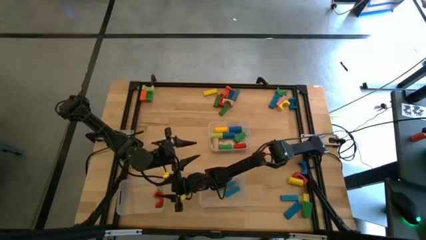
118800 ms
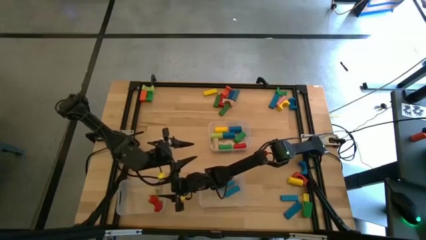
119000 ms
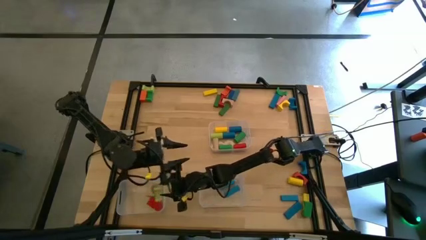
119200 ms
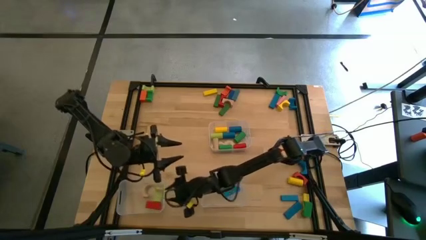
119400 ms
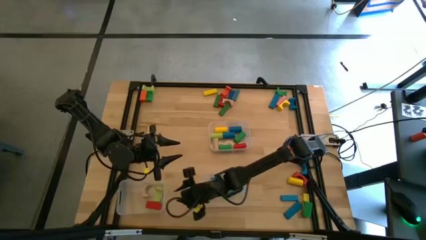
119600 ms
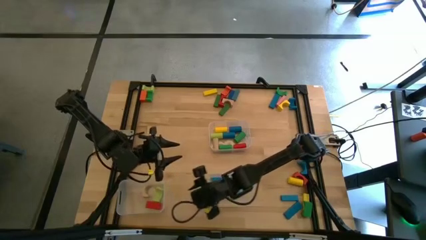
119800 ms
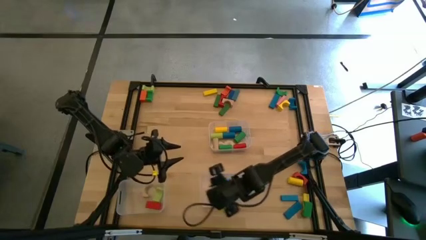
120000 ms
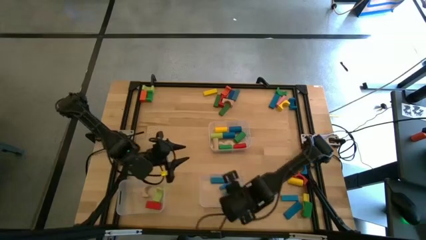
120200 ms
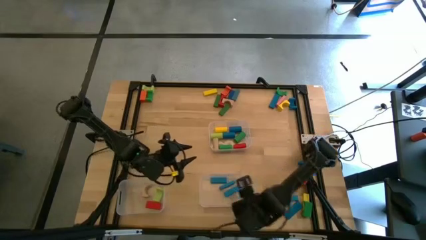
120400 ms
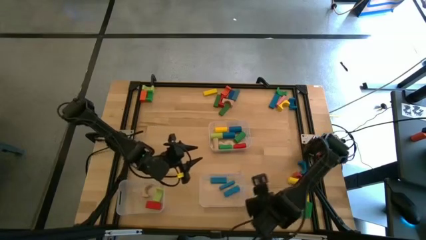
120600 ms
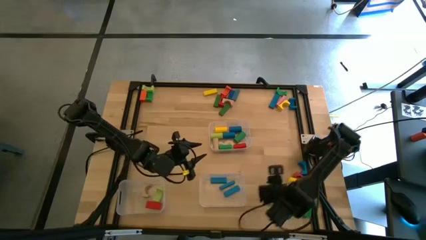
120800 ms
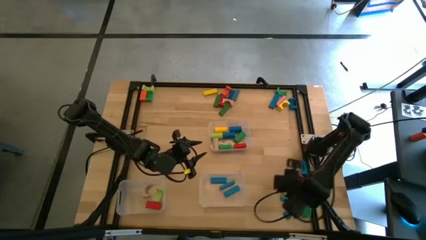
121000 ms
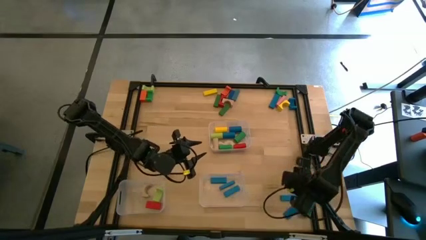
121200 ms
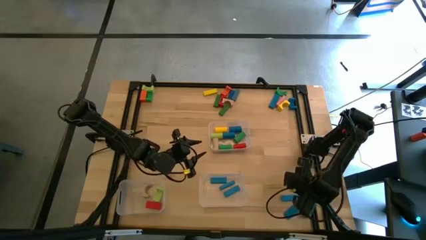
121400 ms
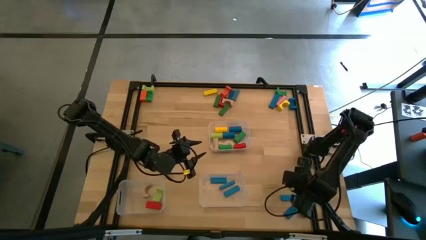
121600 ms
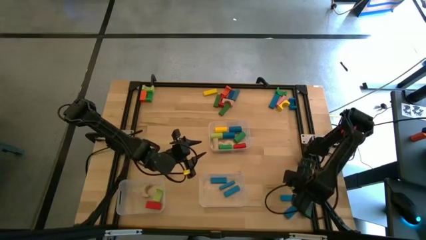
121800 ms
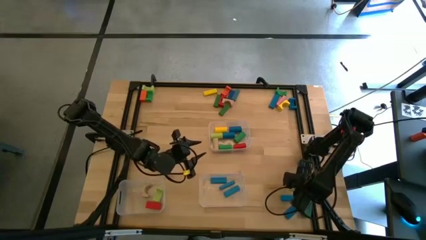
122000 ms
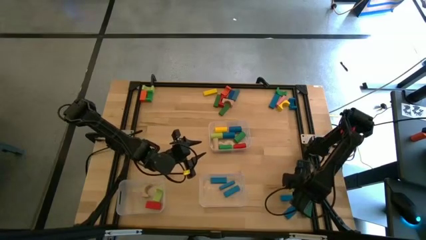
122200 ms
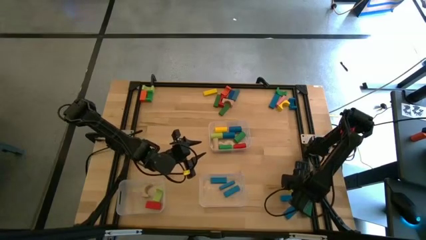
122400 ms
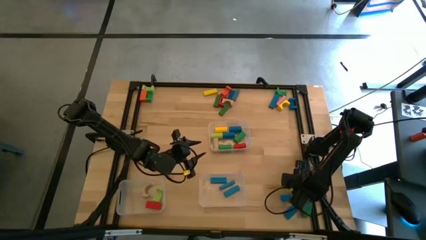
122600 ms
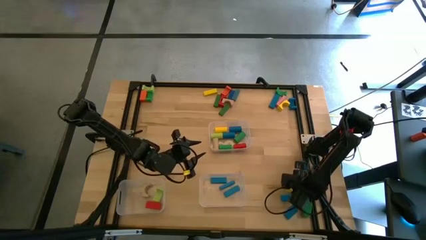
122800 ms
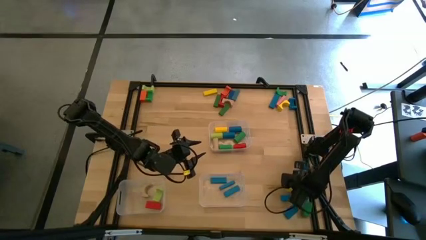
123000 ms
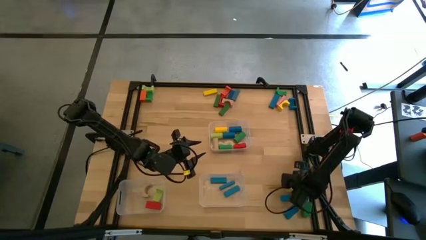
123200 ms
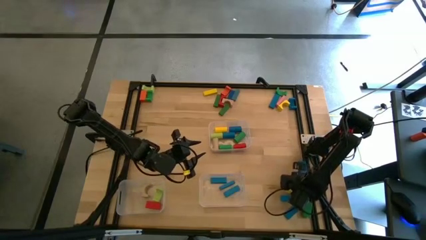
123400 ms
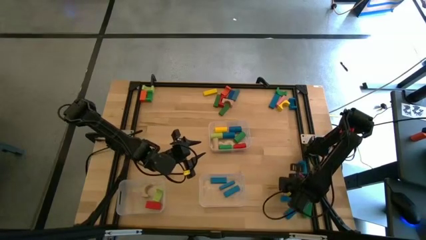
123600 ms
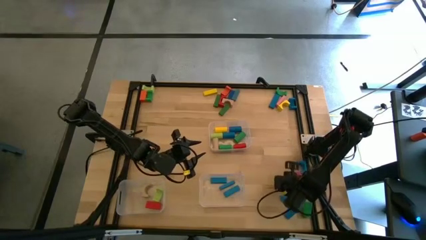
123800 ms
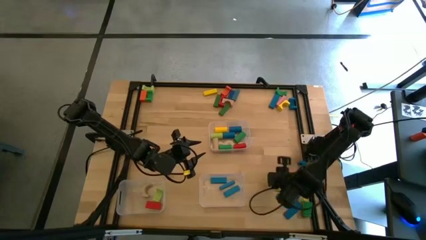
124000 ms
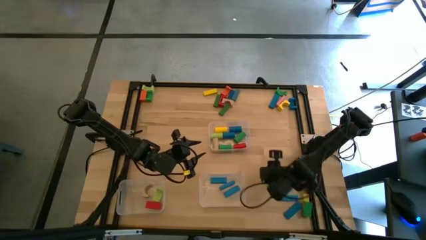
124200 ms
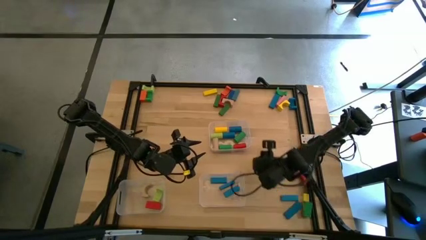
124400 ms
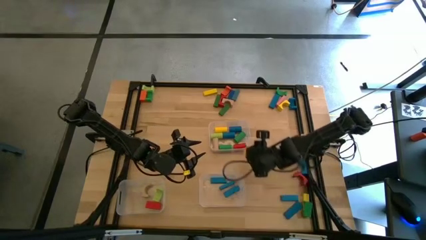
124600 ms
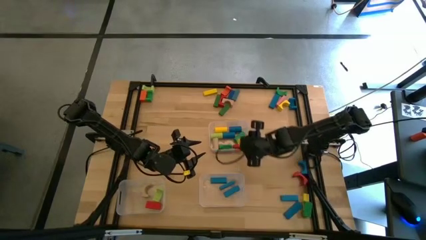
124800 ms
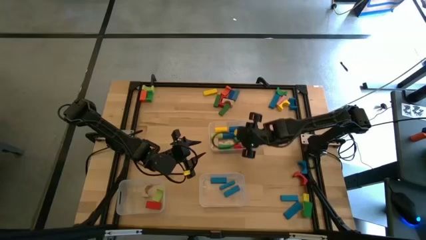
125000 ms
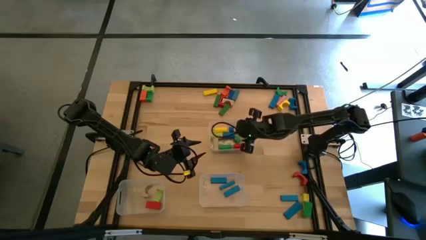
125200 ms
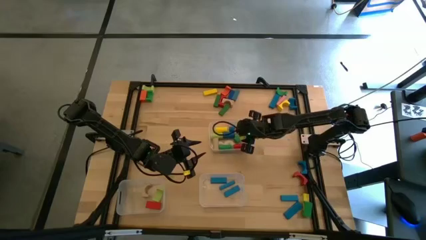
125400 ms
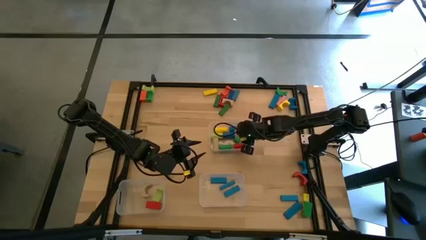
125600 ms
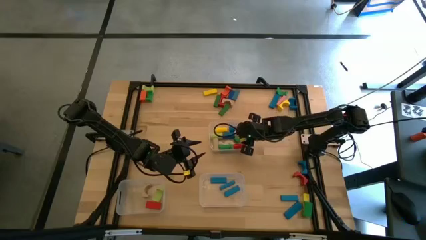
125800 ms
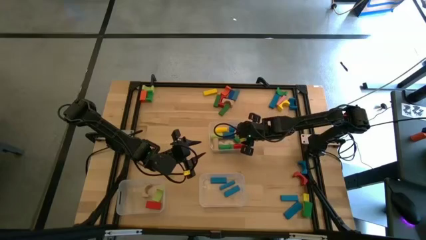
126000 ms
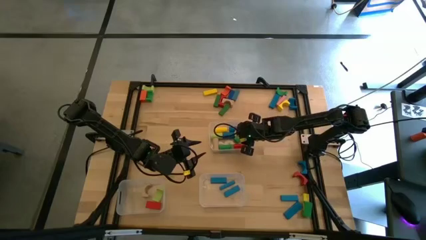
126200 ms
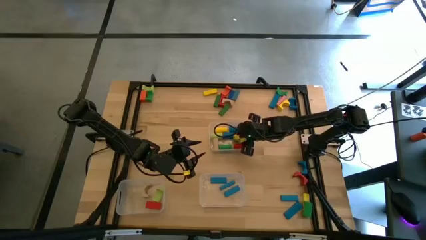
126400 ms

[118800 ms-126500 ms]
Task: Sort blocks by size
Put the yellow cylindrical block into the top transparent bin

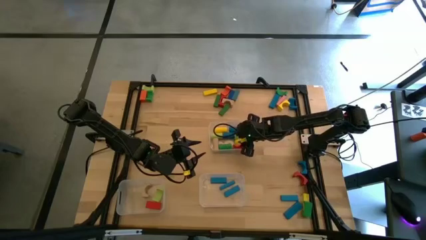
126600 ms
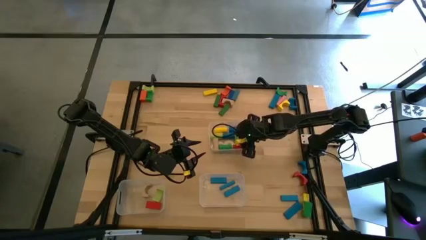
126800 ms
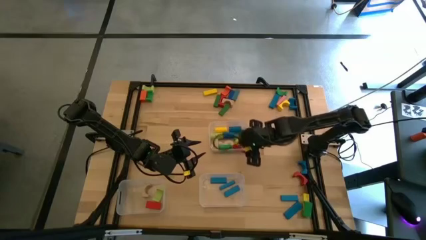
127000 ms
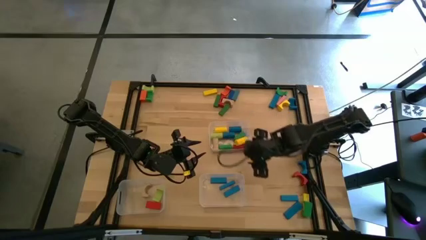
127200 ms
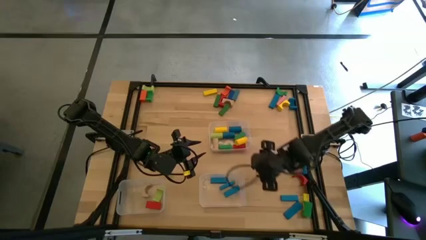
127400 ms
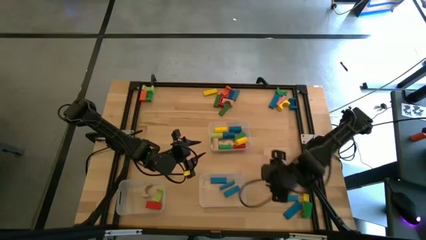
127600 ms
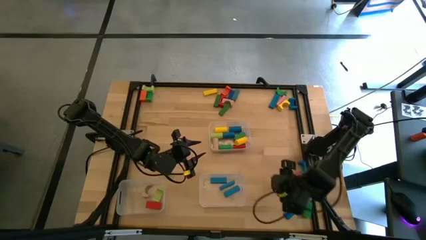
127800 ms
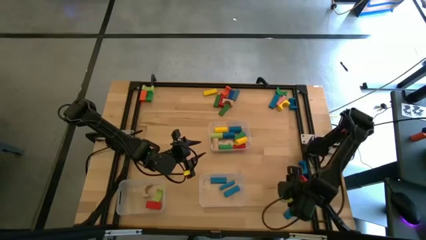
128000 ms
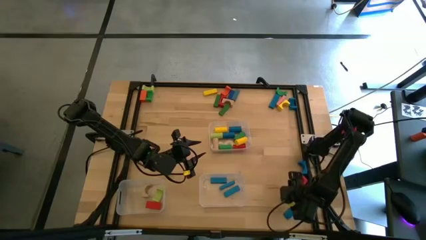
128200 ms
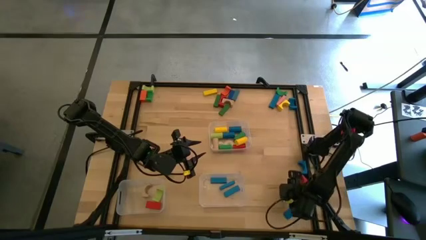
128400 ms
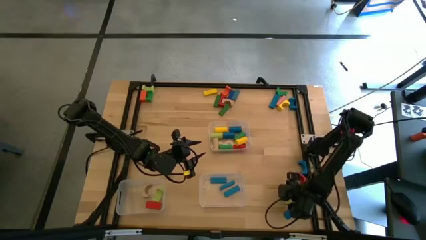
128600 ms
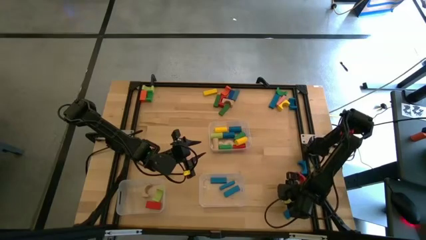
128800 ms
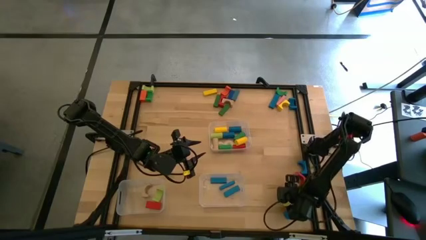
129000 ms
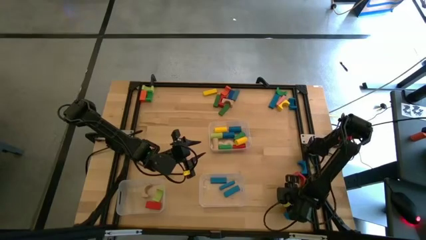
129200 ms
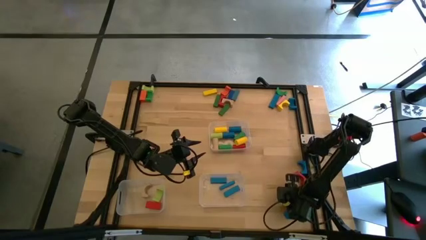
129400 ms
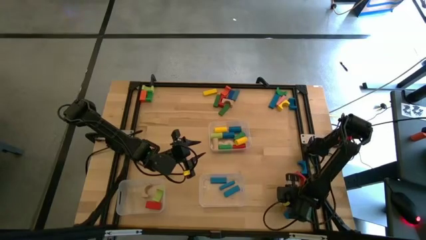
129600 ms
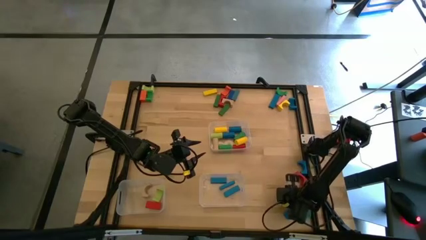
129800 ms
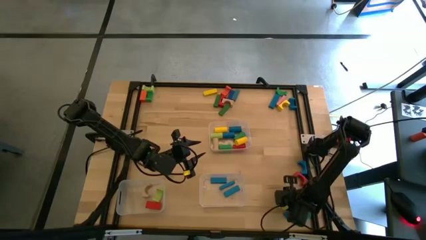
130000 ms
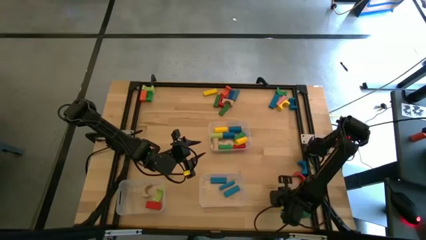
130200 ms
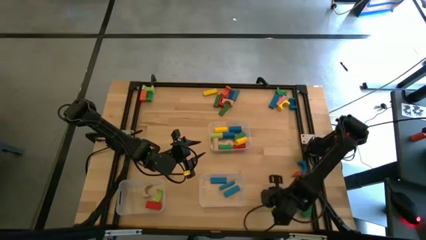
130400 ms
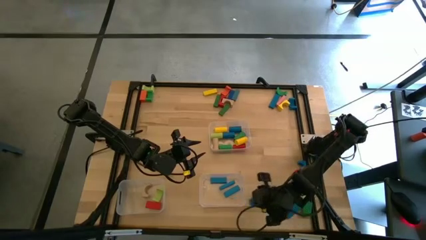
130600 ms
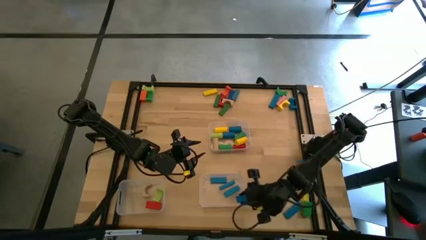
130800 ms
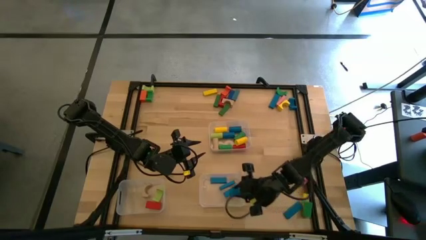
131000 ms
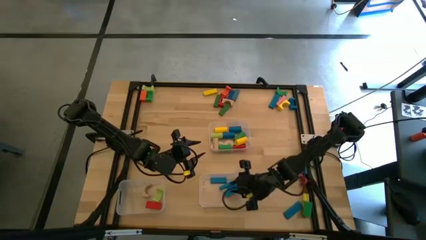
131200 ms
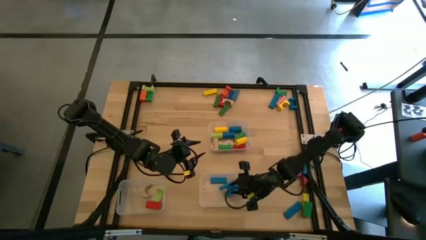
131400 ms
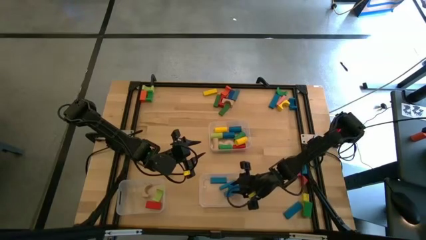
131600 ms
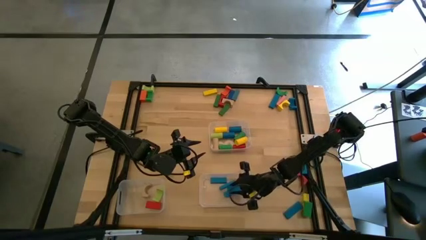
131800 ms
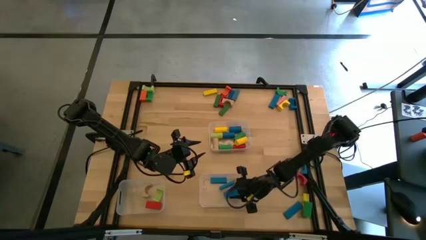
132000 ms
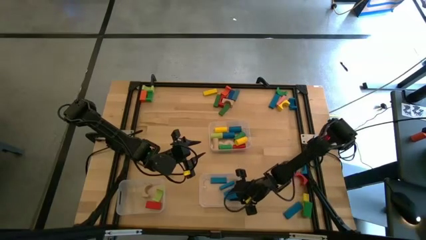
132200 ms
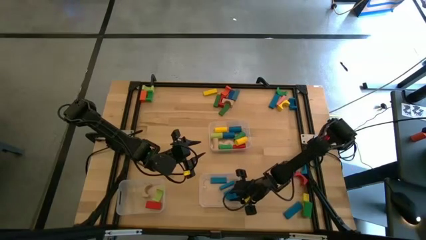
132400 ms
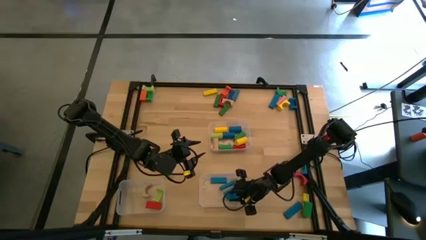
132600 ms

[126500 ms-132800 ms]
Put the blue rectangular block into the bottom right transparent bin

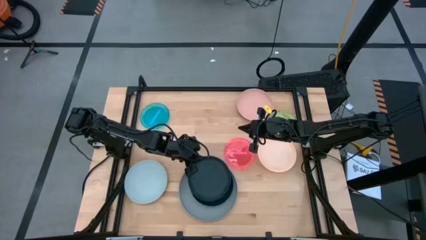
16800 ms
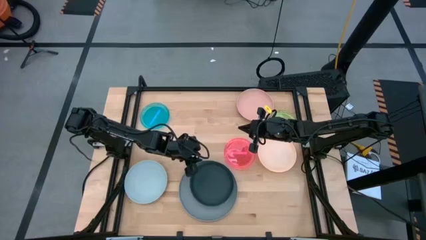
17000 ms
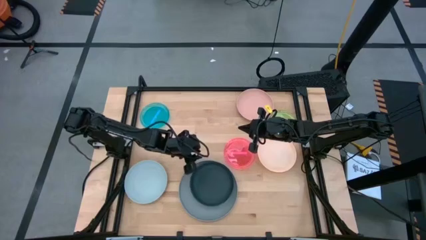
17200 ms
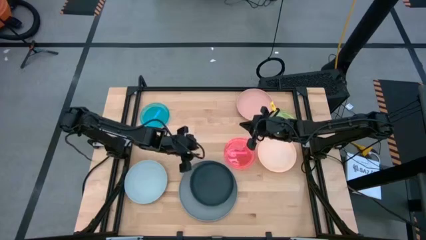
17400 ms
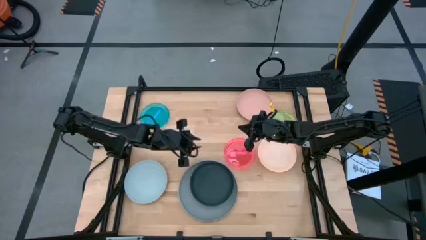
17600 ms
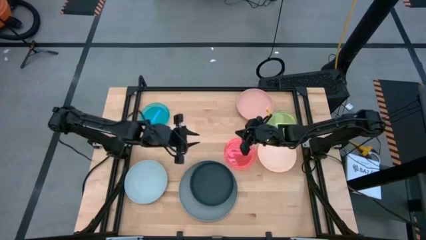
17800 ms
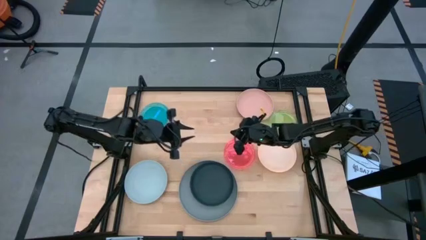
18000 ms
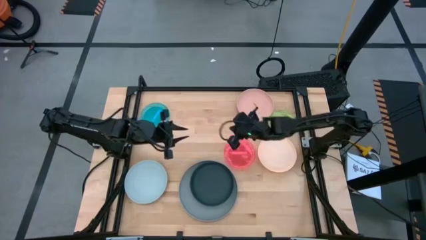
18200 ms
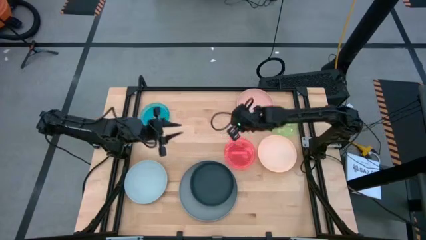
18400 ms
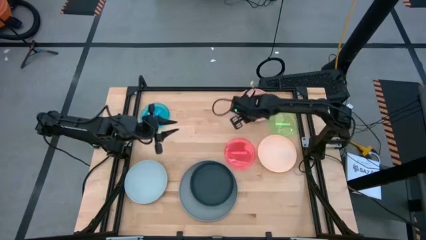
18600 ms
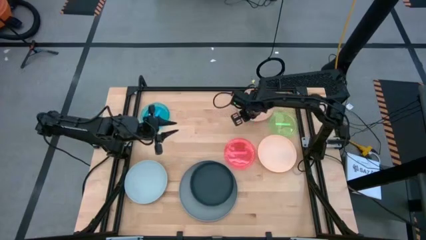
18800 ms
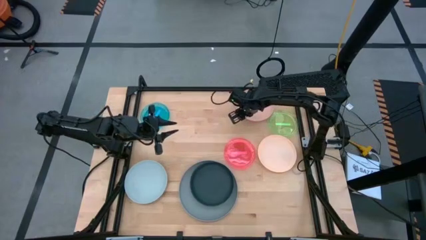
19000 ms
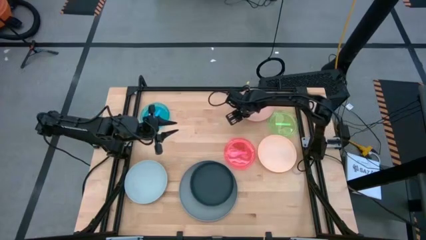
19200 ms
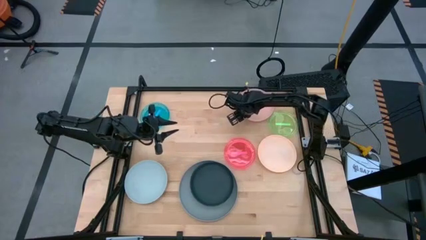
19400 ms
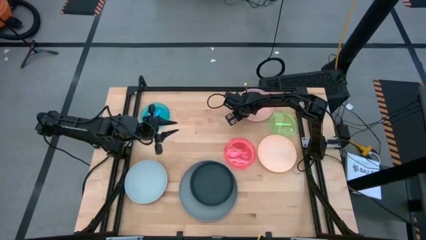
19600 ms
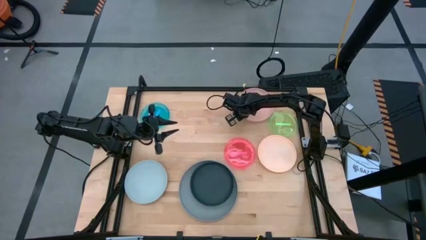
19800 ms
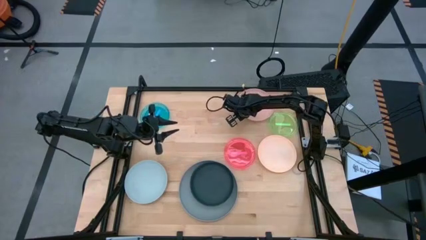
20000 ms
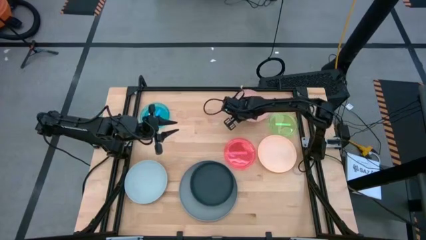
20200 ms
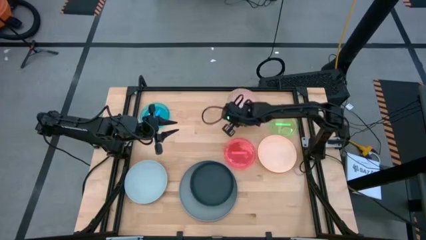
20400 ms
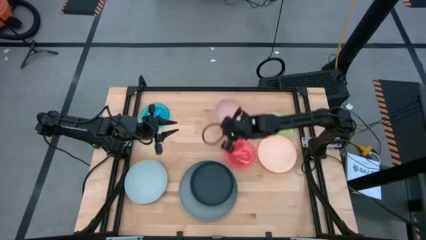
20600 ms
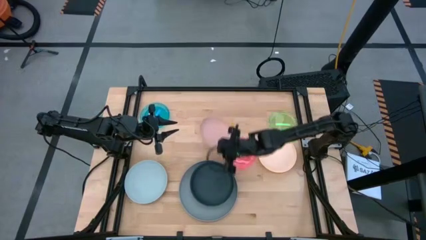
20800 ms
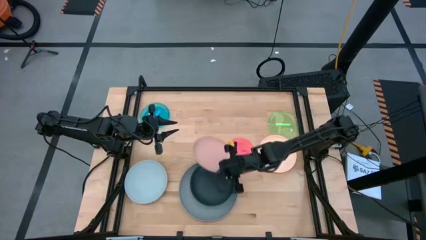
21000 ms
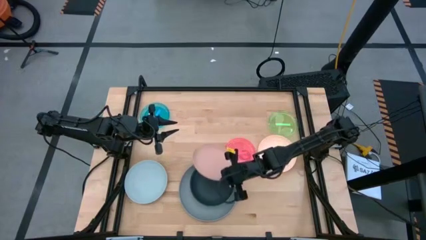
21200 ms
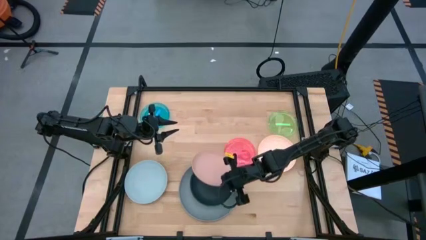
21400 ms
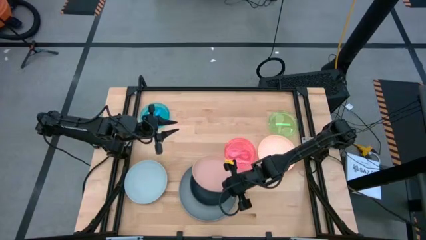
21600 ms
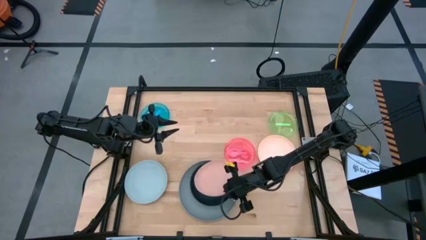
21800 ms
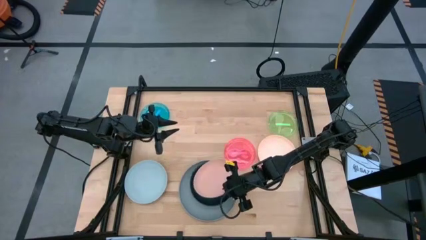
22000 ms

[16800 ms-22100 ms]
Task: Stack plastic plates
Stack the pink plate on top of the black plate
